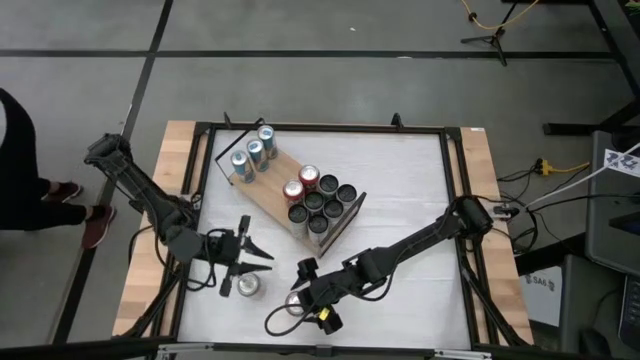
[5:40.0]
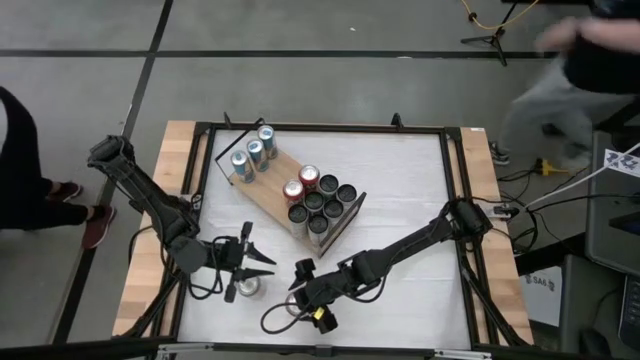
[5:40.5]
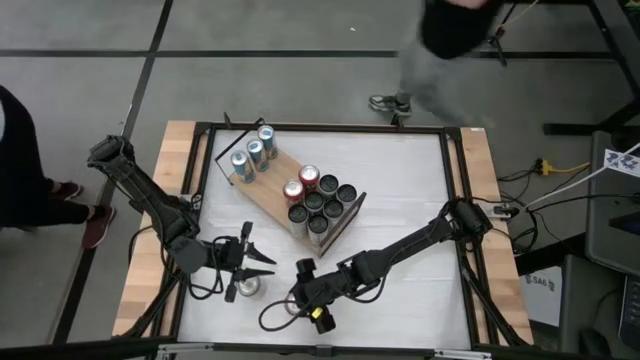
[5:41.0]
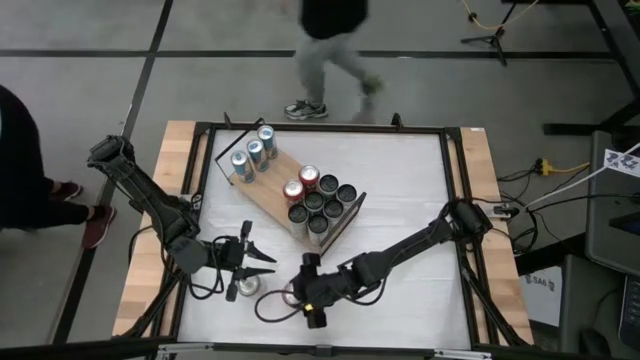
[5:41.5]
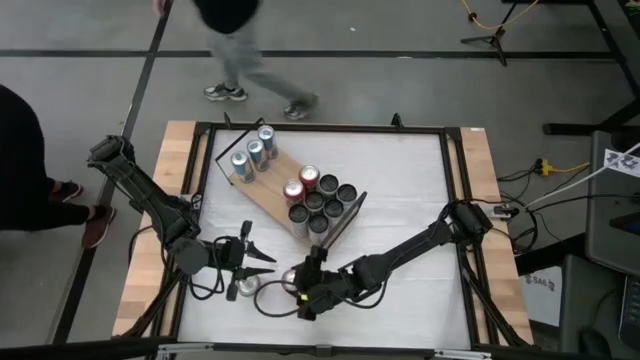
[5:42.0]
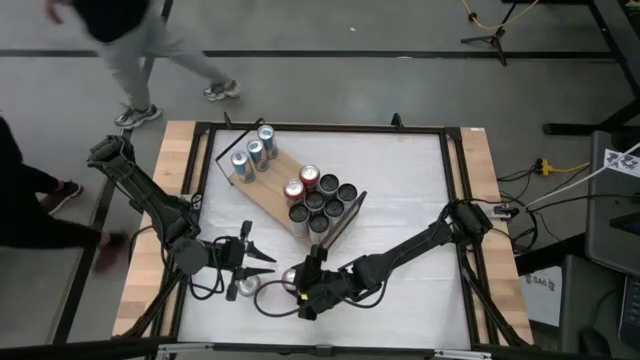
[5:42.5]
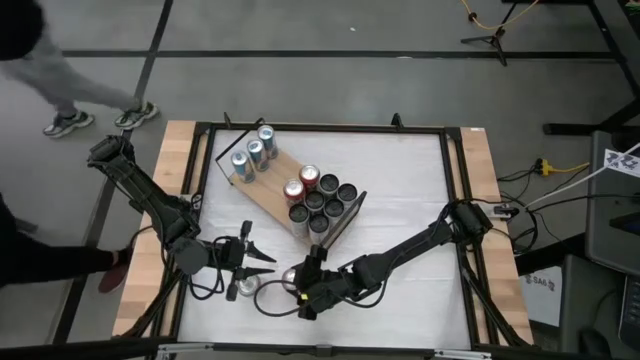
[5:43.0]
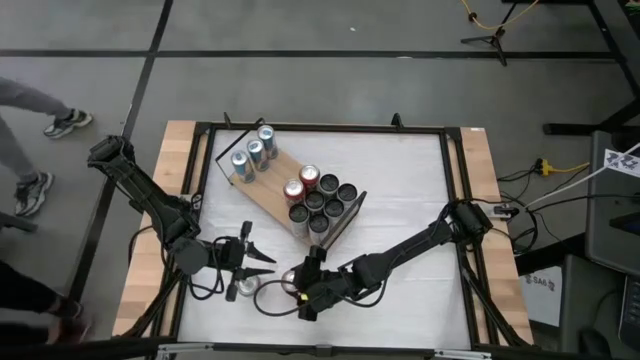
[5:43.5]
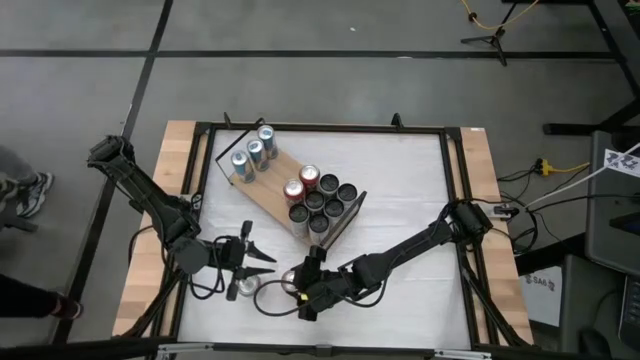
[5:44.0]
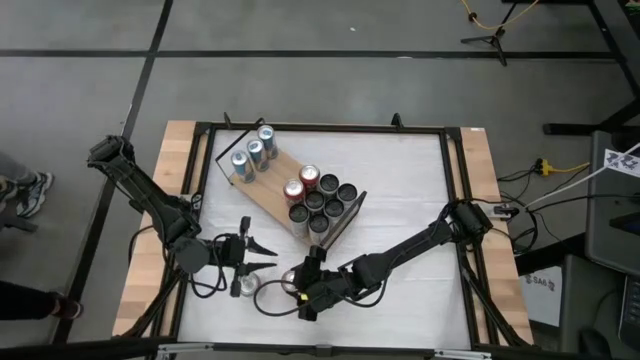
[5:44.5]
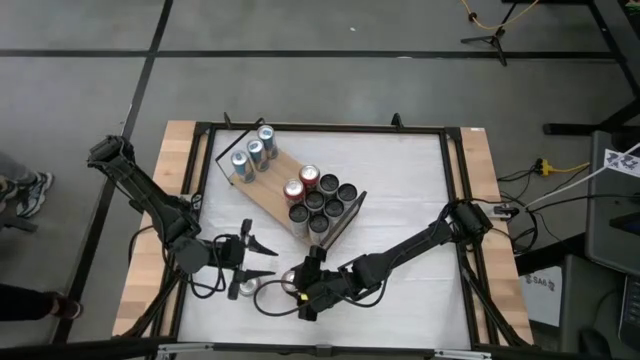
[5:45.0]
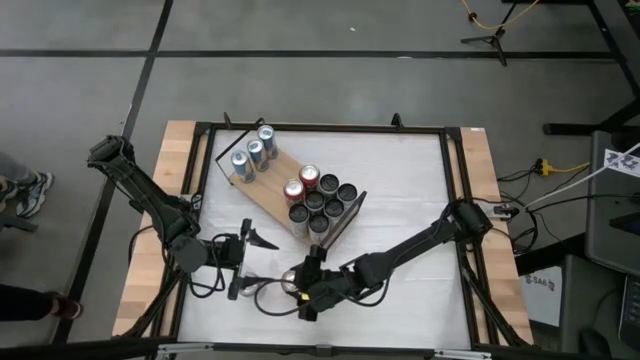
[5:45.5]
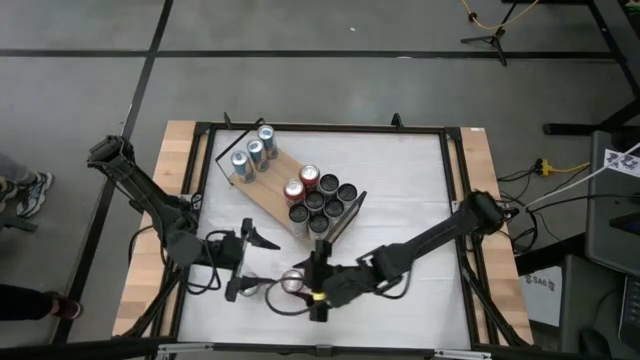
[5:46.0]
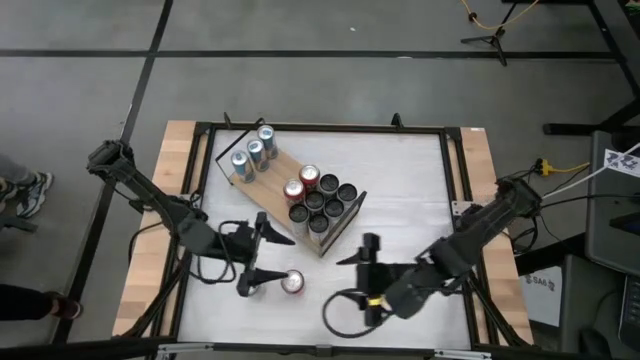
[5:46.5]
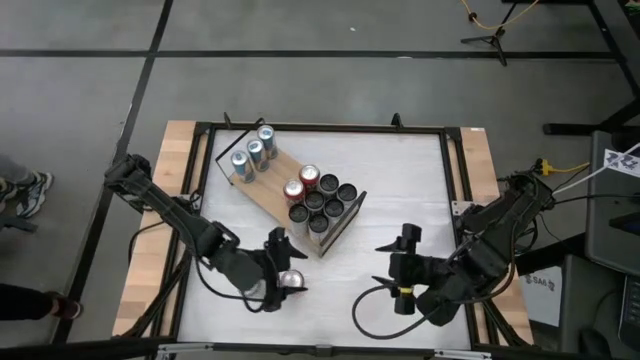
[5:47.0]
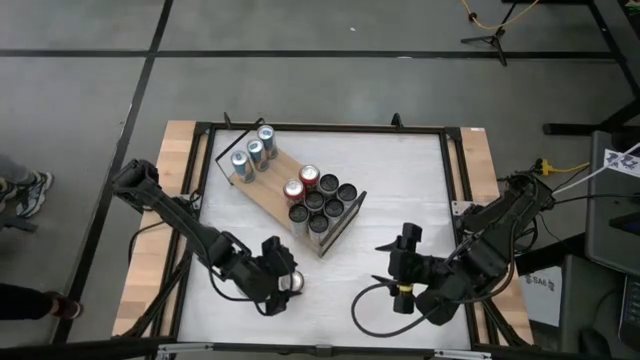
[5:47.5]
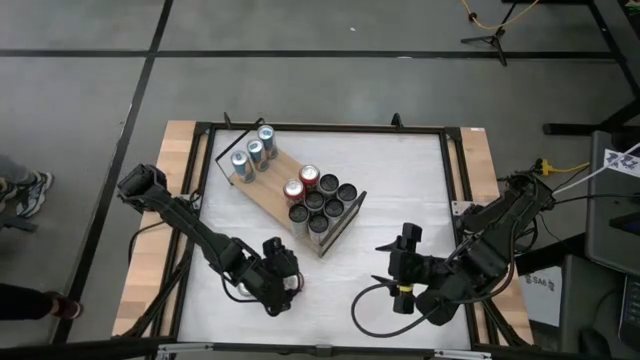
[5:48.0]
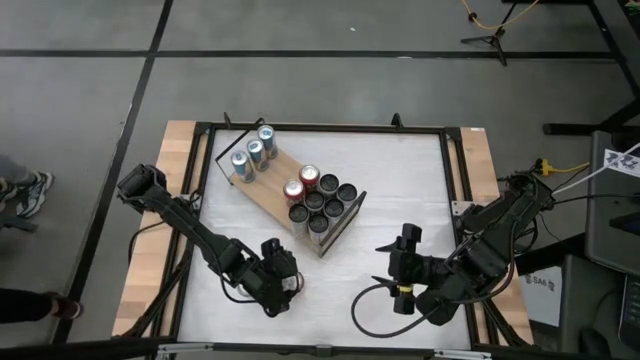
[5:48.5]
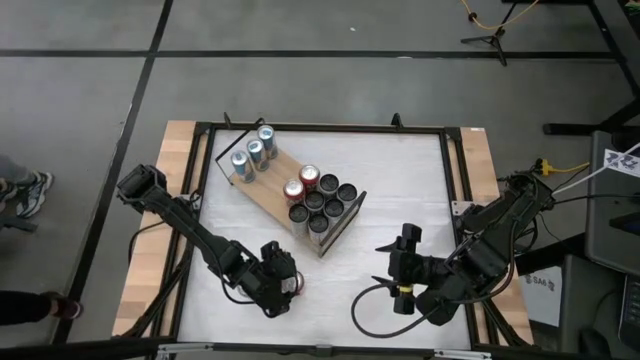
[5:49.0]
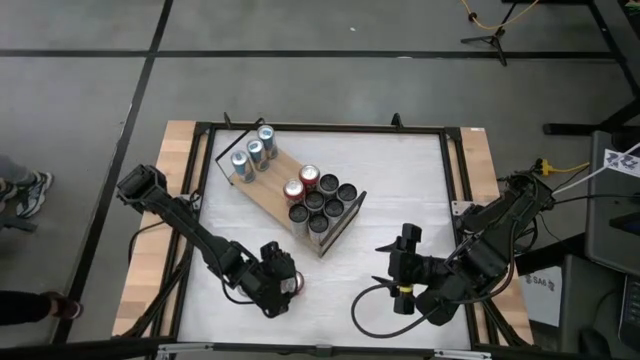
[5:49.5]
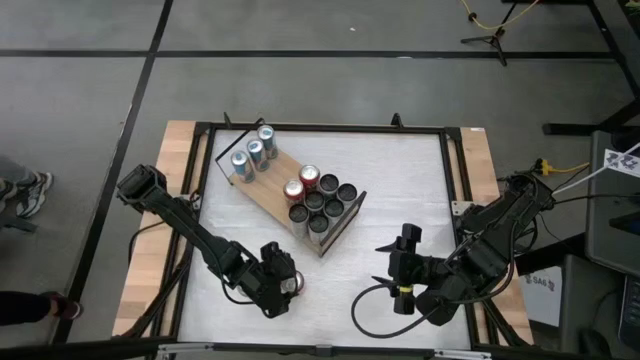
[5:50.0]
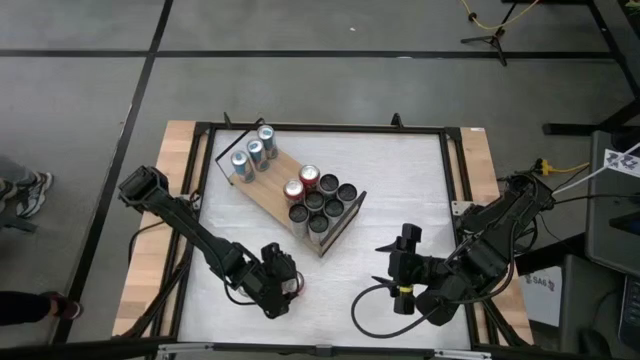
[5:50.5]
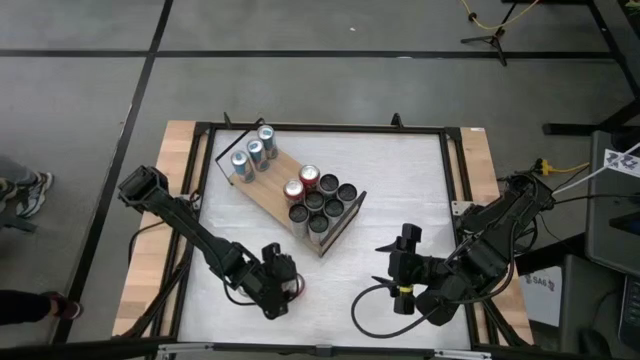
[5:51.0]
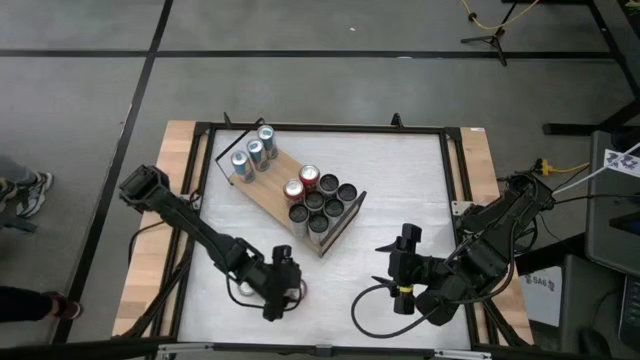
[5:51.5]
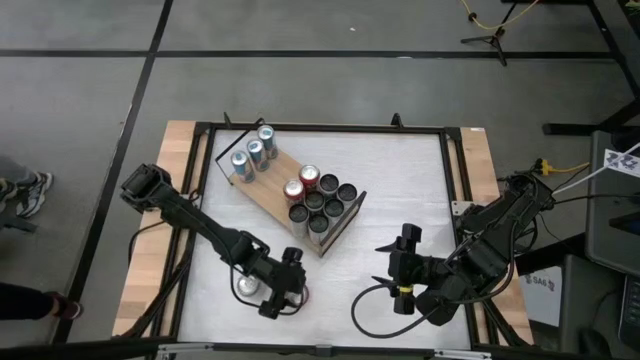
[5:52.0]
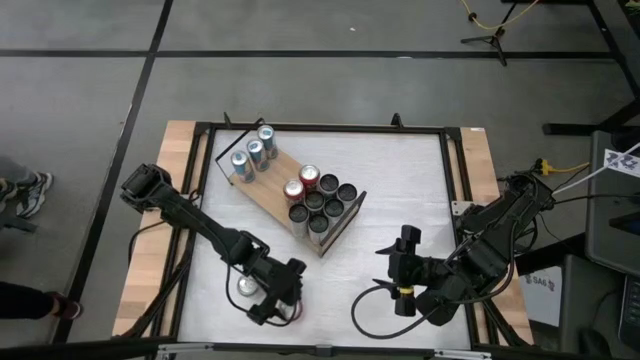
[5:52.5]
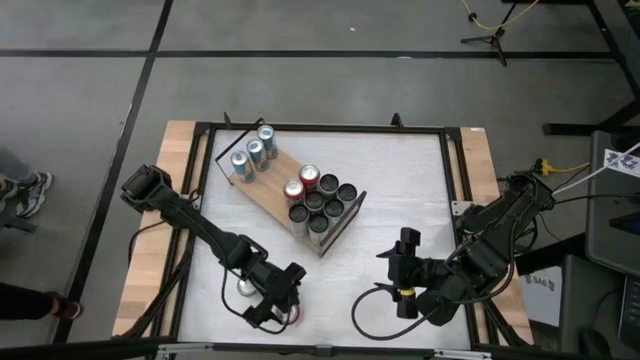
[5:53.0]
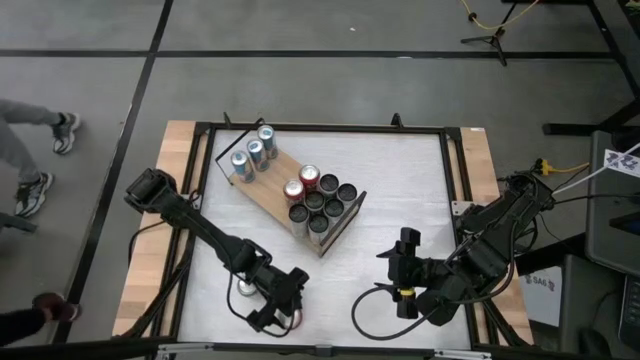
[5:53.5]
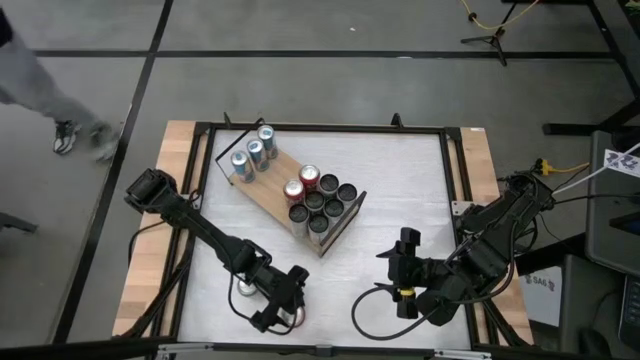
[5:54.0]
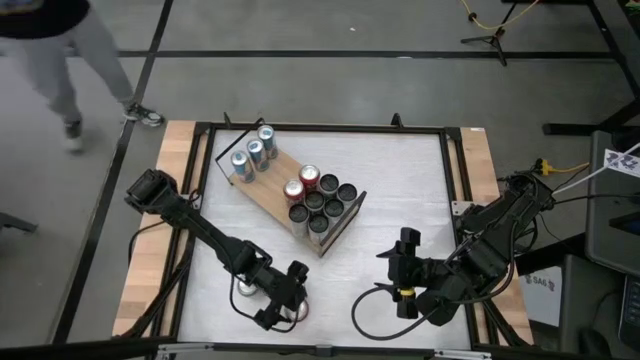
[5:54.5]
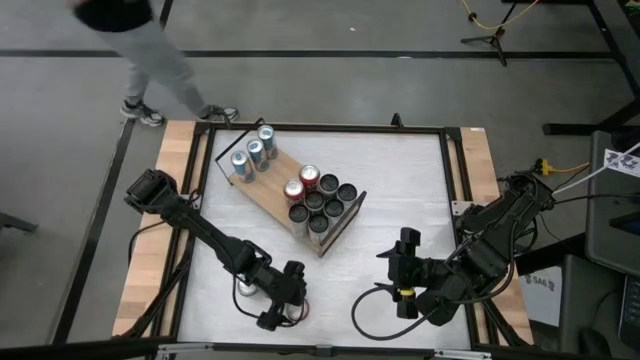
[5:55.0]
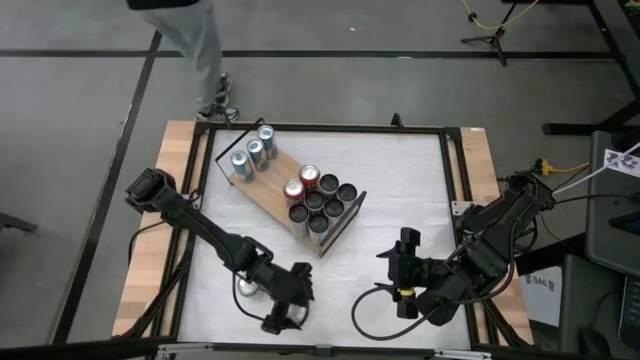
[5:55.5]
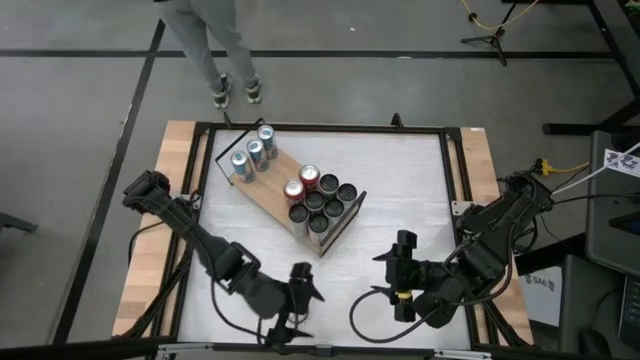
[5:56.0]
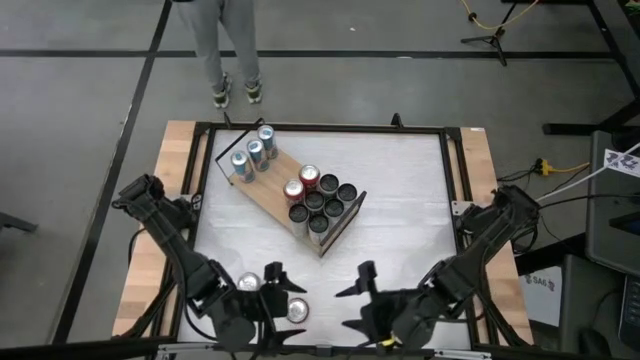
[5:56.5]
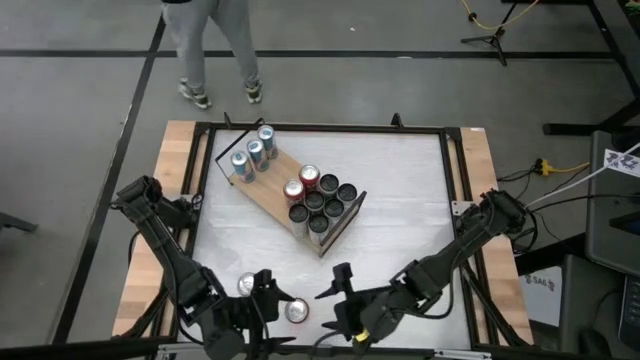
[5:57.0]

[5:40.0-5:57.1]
Task: Place canned beverage on shelf
Put the red soda can on the shelf aligned with the other red soda cans
